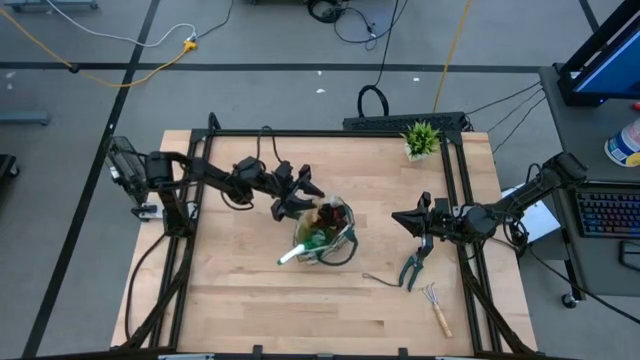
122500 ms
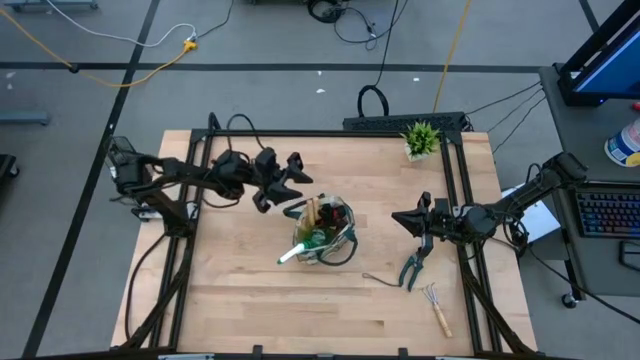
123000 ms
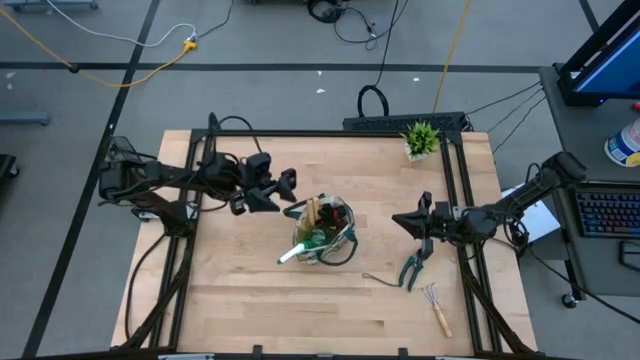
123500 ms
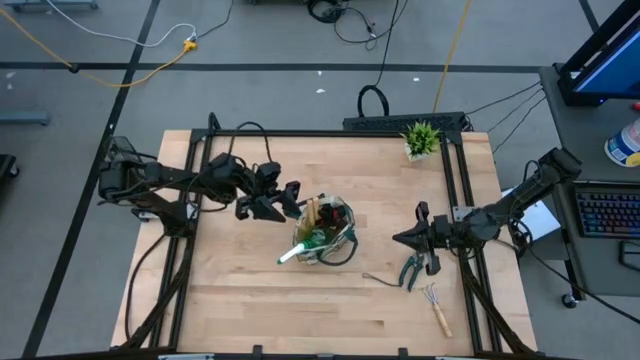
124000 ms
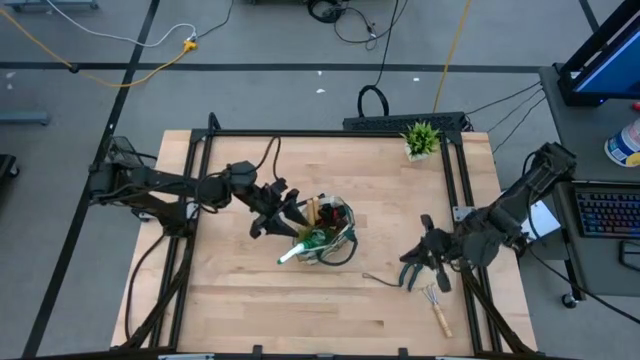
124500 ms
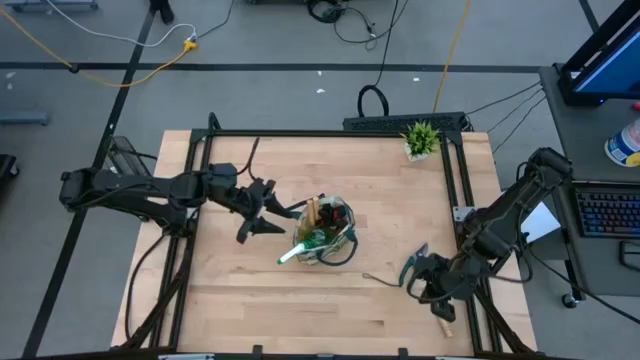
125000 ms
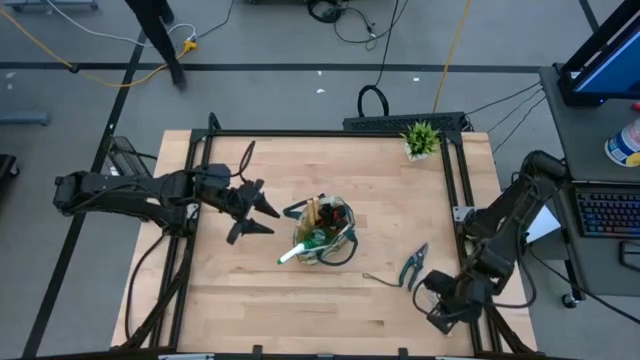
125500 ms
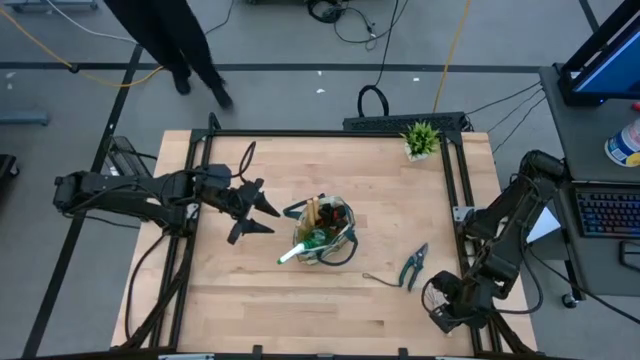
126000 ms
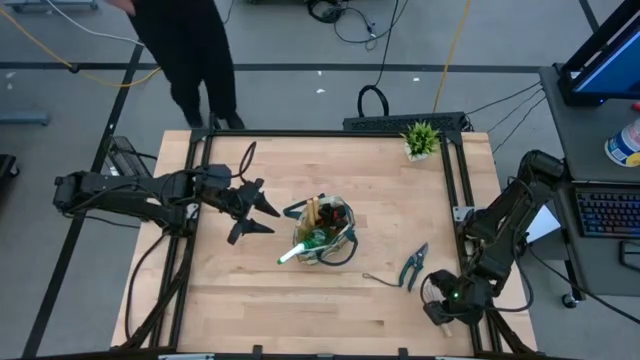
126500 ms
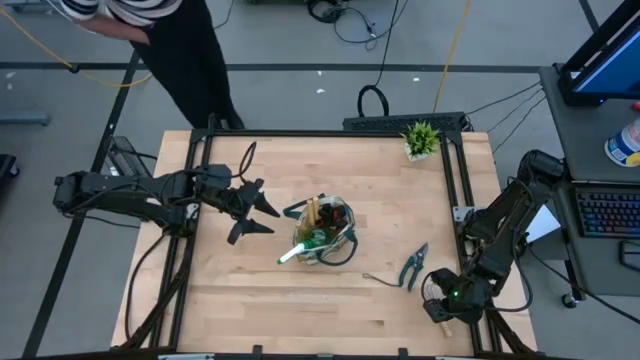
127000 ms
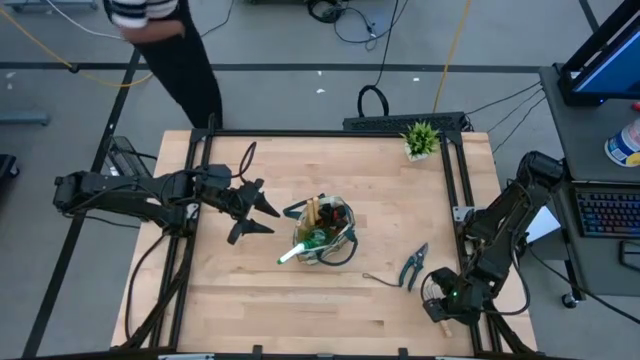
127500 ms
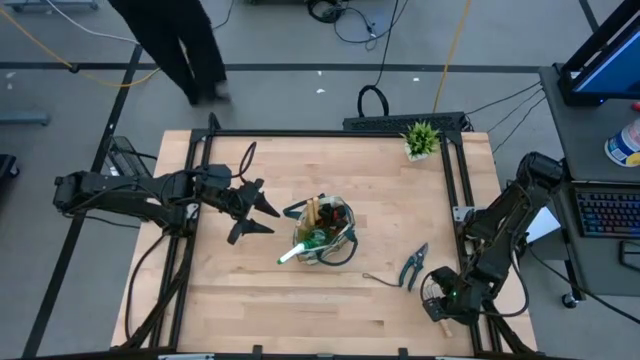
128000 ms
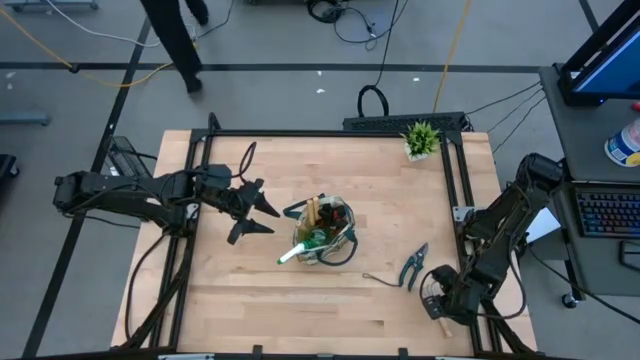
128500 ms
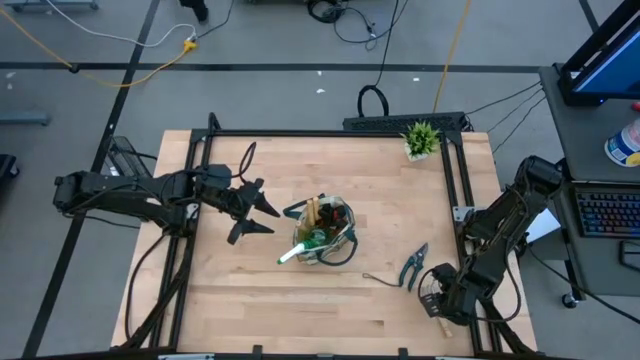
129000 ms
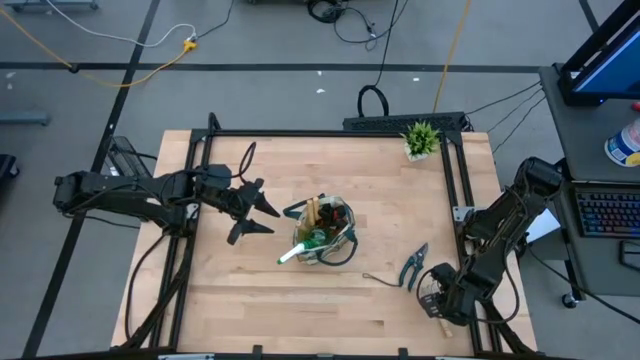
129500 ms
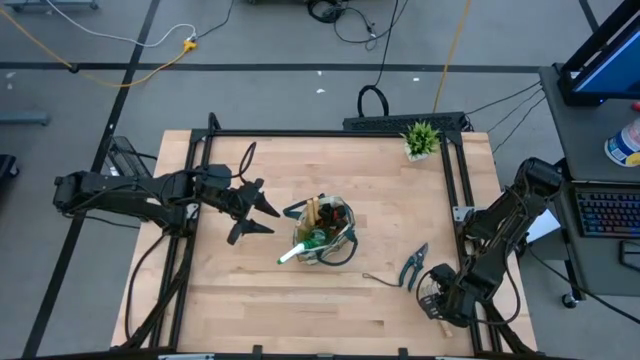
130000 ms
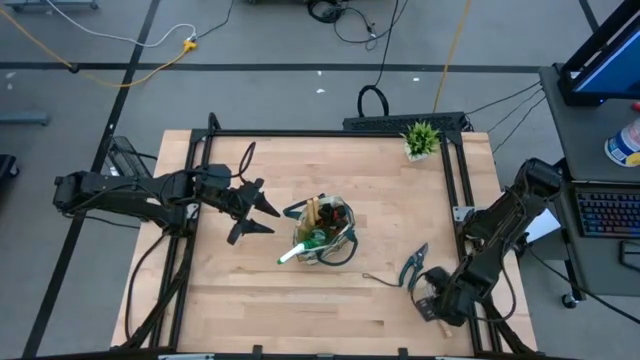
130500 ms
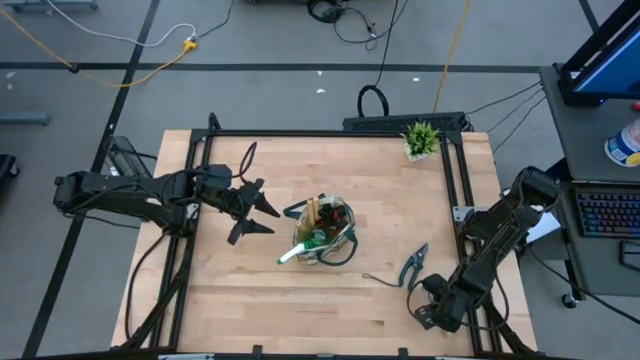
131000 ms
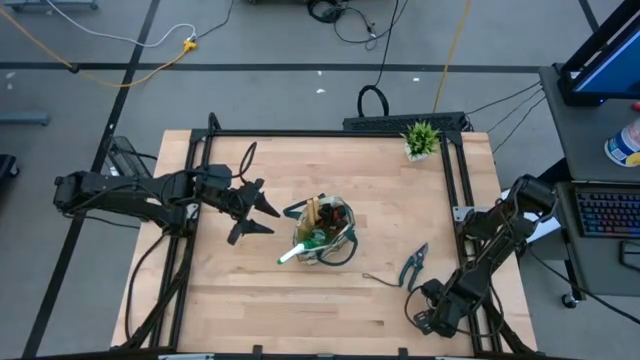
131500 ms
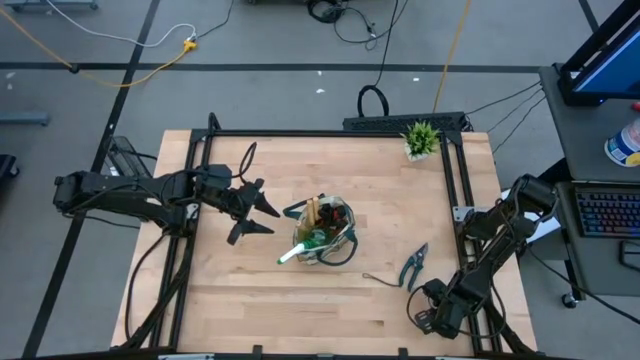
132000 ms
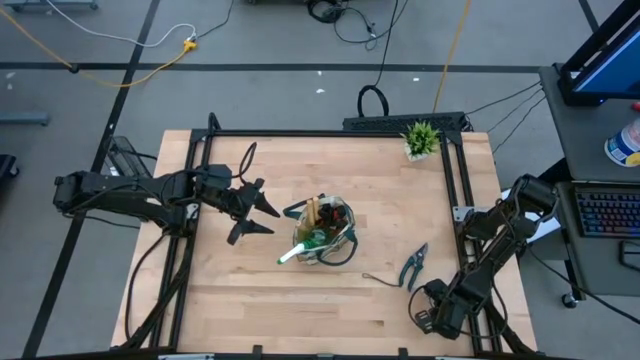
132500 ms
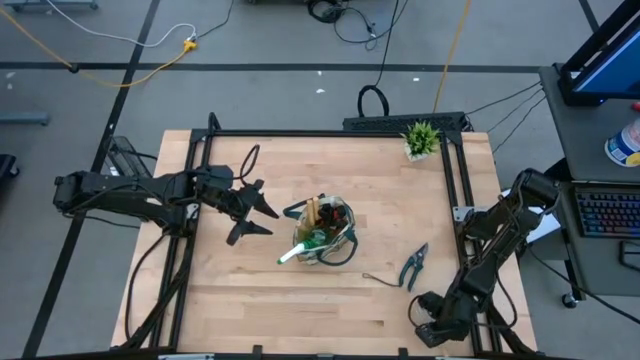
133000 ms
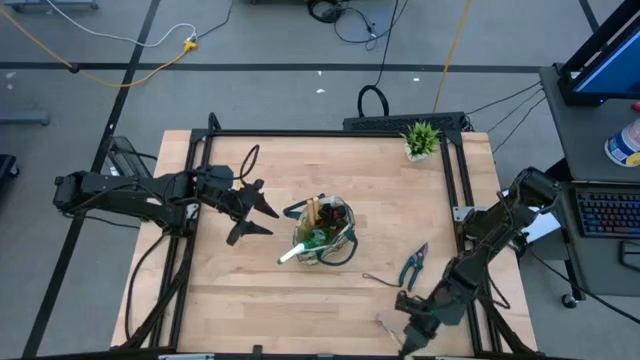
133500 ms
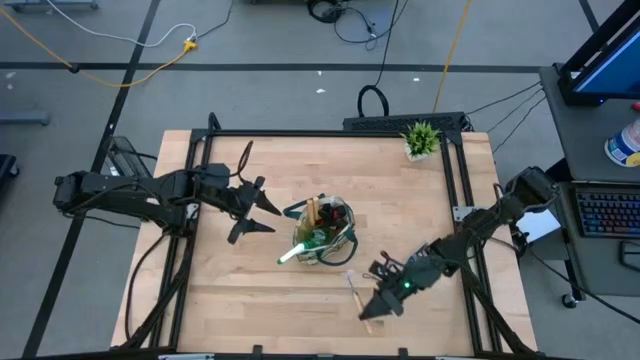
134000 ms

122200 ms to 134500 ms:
Task: Pick & Place Garden tools in Gardening bag
Put the hand rake into the gardening bag

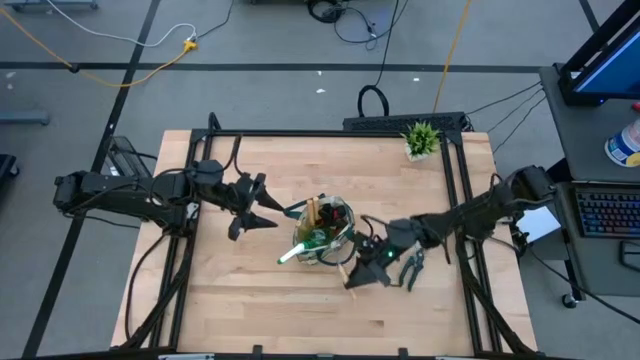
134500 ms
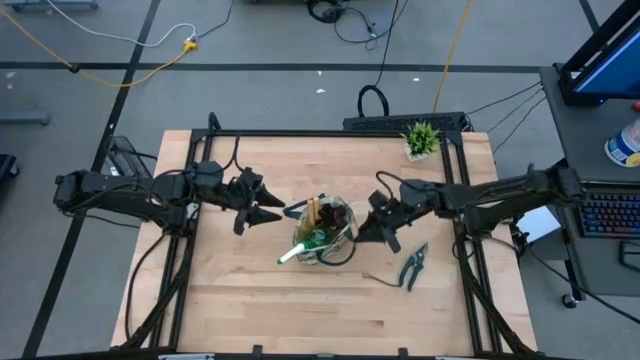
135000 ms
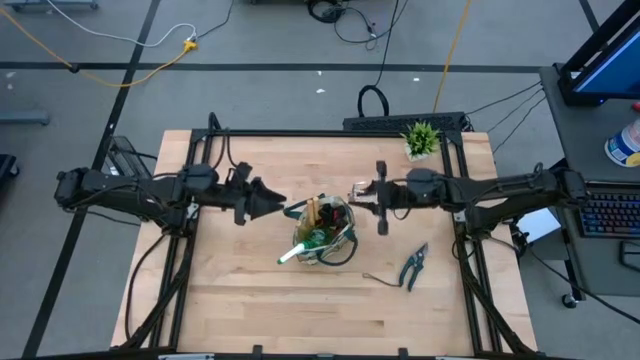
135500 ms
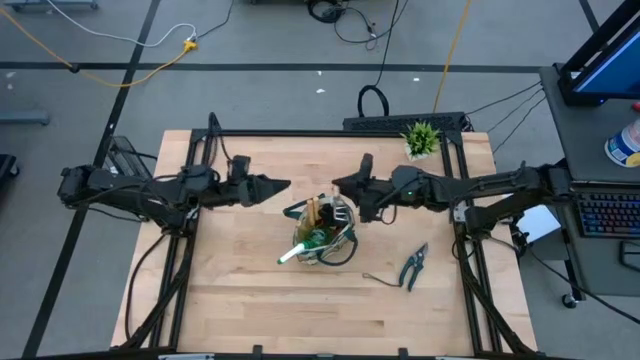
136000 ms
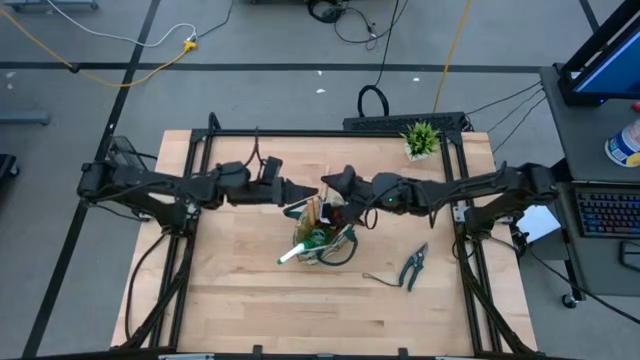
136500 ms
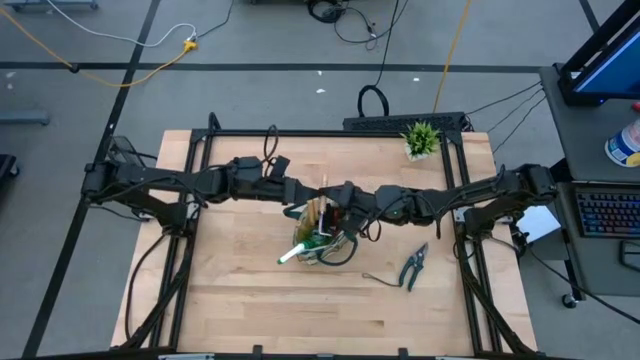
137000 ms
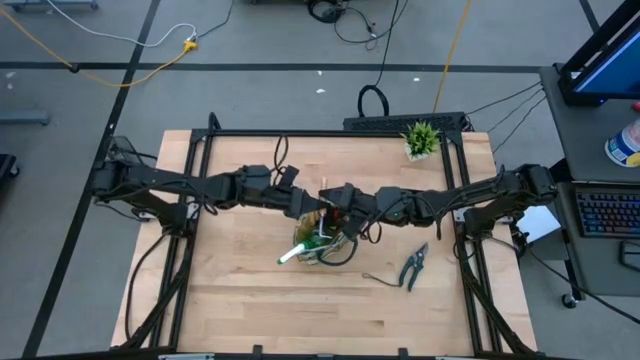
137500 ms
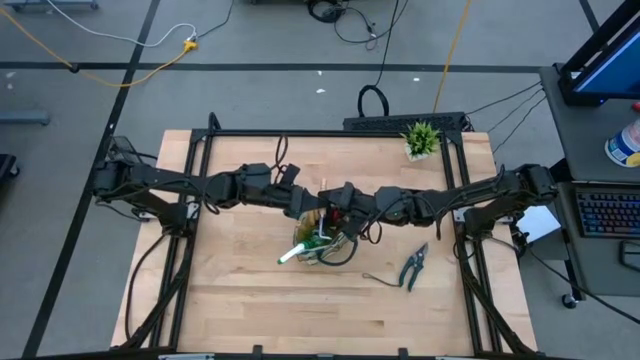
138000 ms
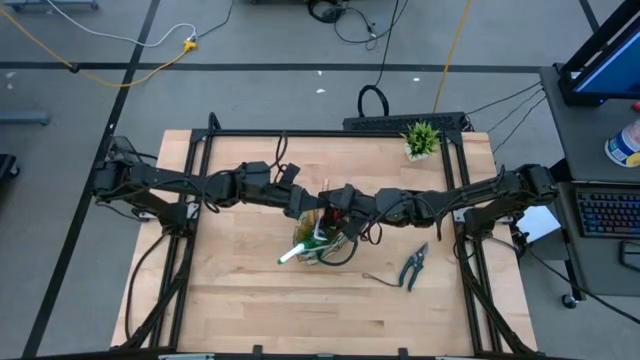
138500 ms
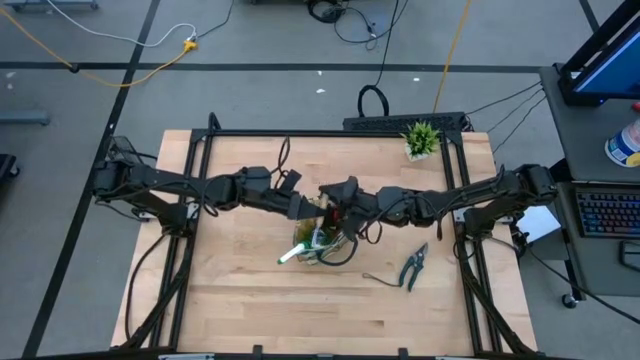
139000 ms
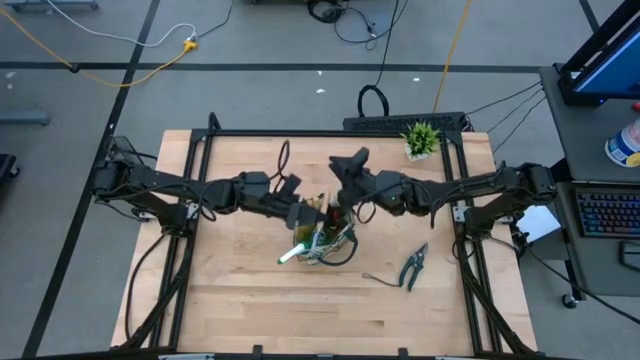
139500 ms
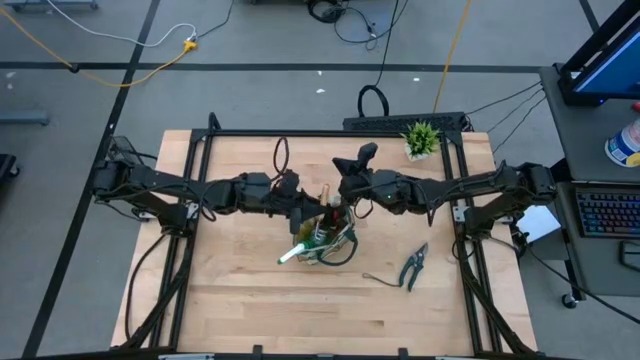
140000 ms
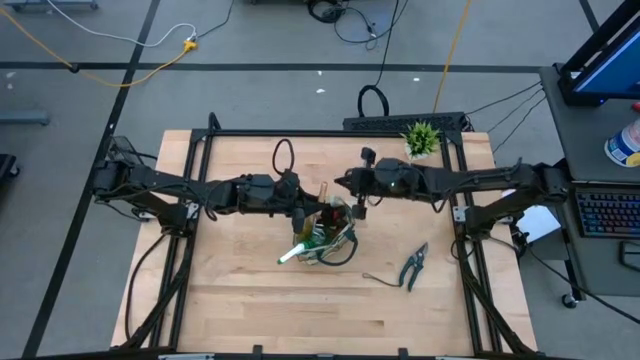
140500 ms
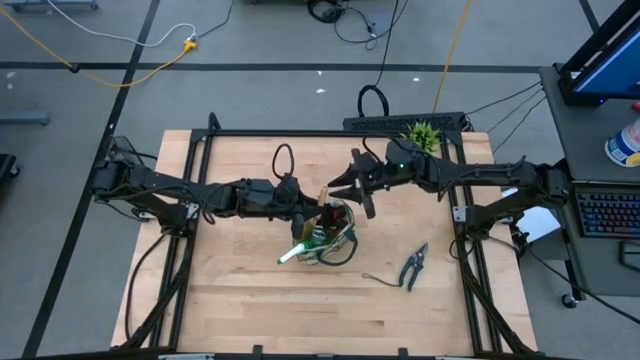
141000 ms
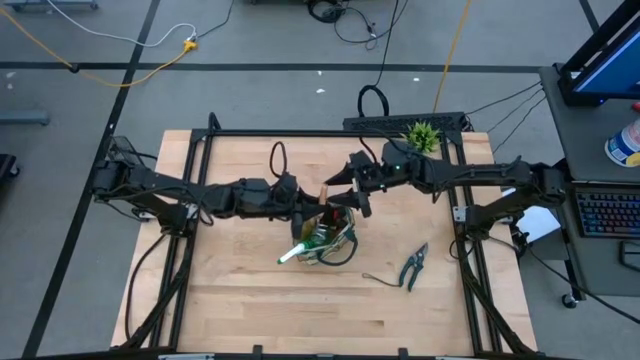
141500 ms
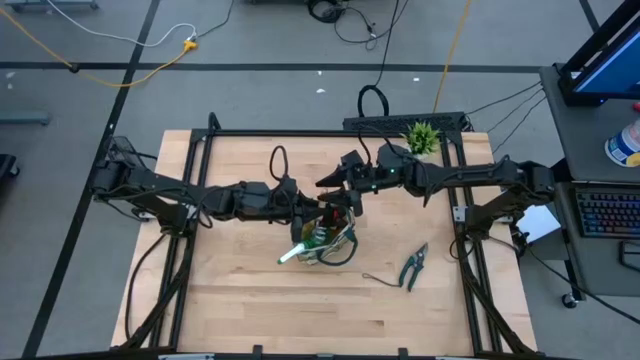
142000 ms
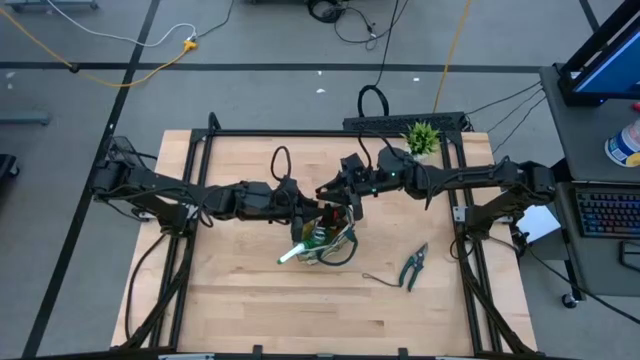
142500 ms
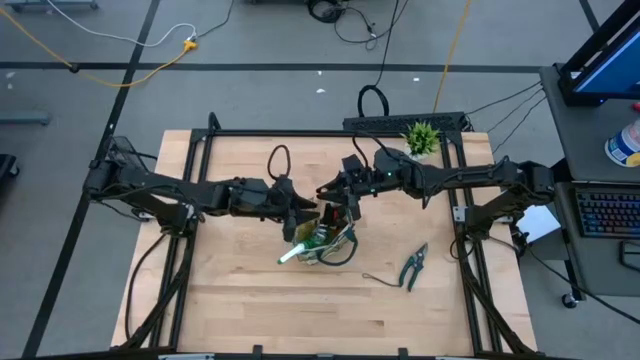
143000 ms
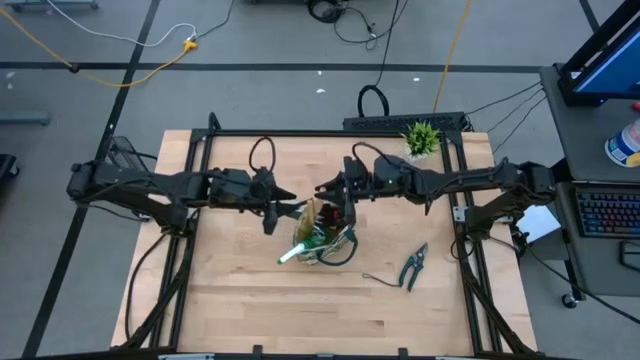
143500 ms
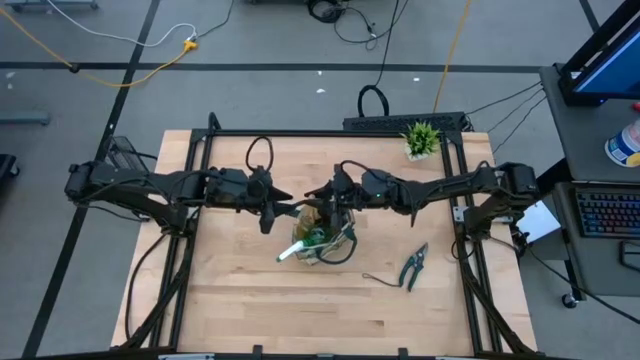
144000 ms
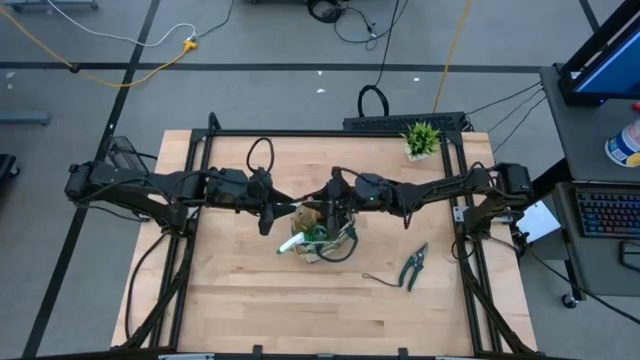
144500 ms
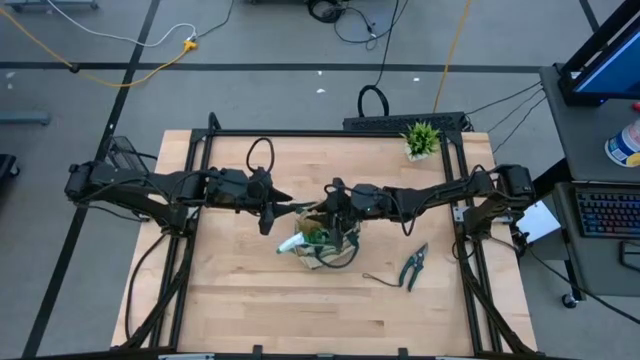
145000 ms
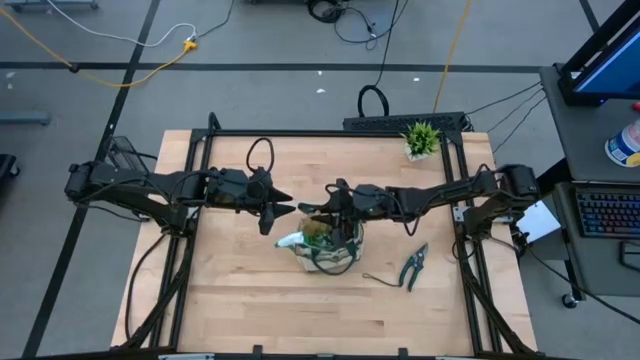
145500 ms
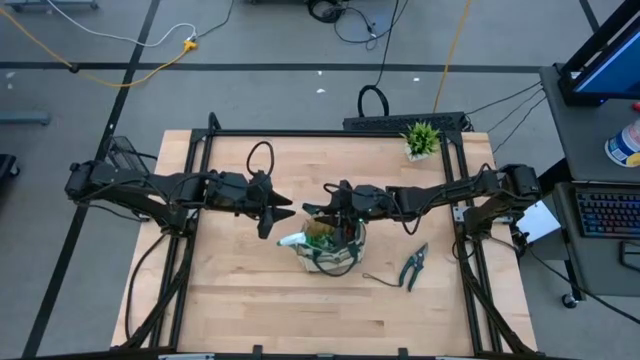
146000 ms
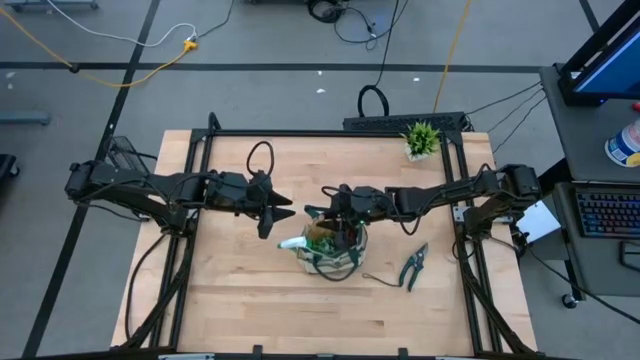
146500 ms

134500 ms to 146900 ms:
Put the hand rake into the gardening bag
